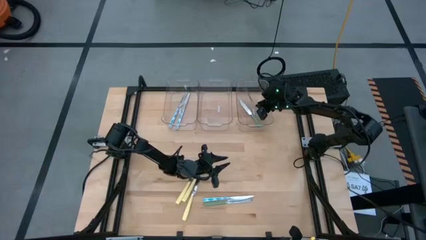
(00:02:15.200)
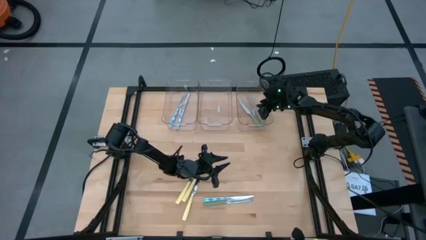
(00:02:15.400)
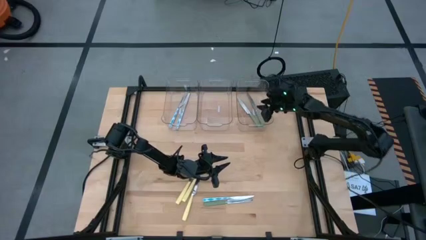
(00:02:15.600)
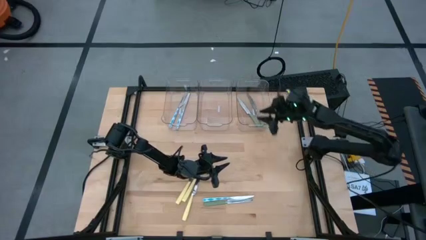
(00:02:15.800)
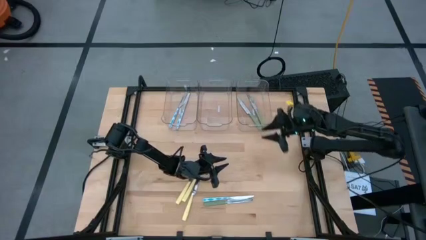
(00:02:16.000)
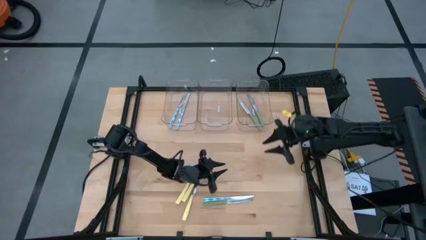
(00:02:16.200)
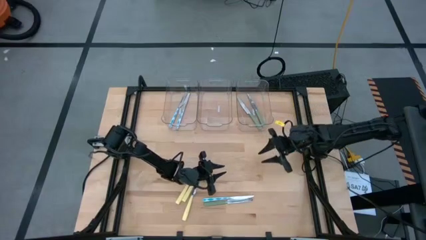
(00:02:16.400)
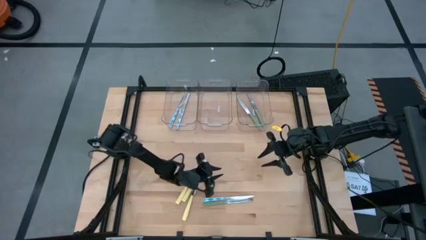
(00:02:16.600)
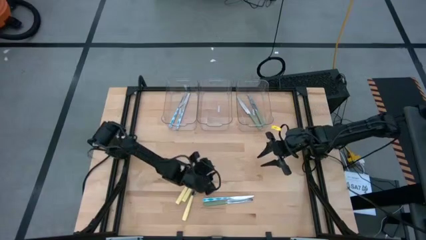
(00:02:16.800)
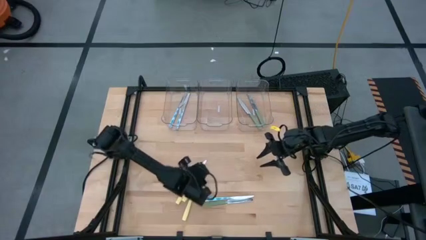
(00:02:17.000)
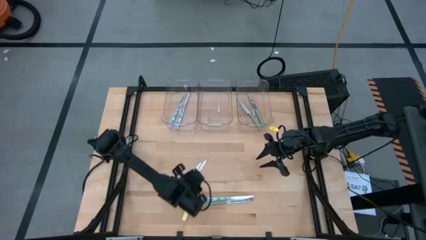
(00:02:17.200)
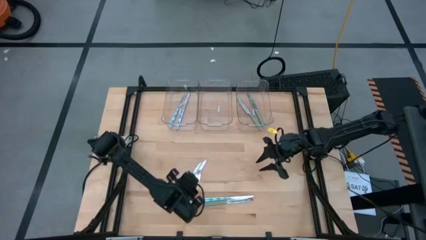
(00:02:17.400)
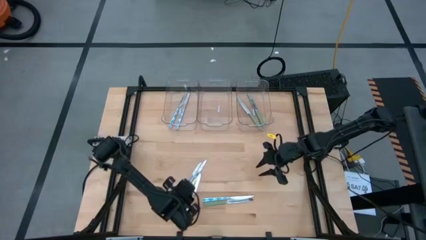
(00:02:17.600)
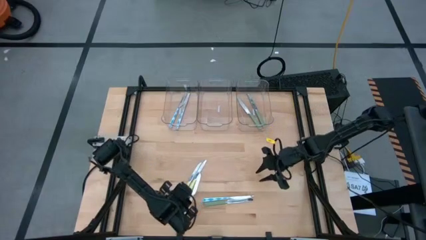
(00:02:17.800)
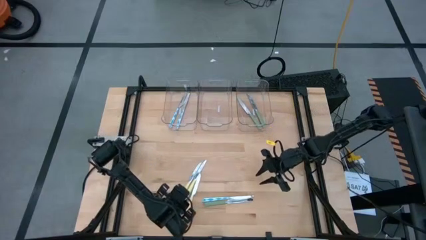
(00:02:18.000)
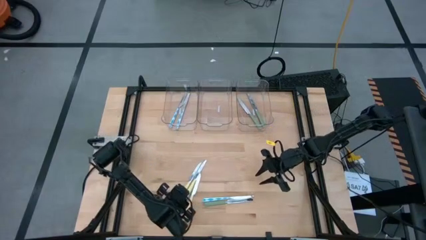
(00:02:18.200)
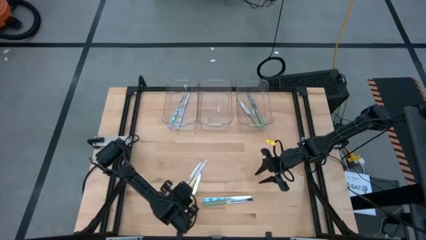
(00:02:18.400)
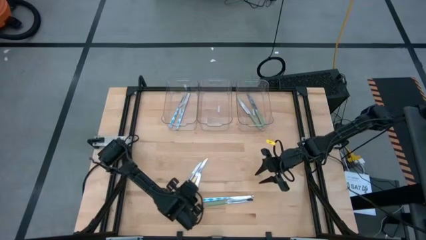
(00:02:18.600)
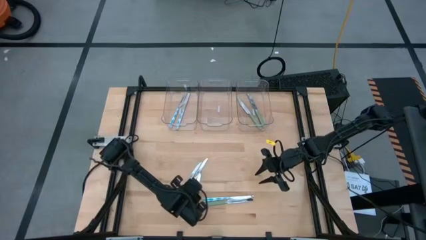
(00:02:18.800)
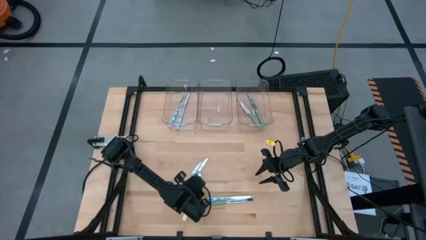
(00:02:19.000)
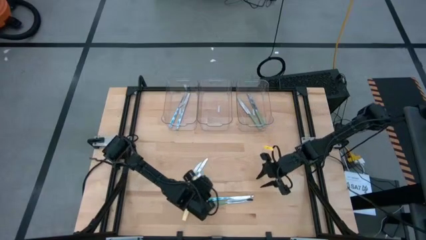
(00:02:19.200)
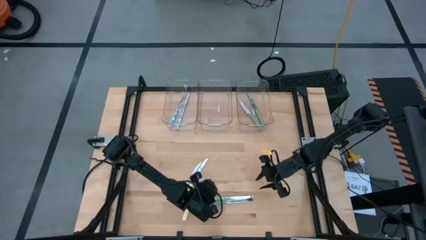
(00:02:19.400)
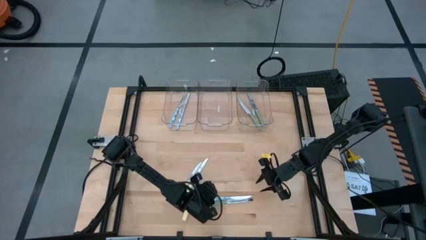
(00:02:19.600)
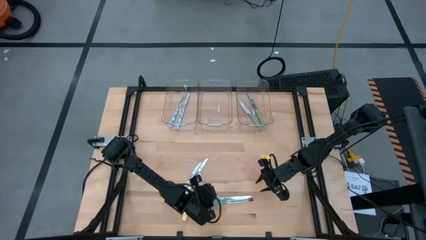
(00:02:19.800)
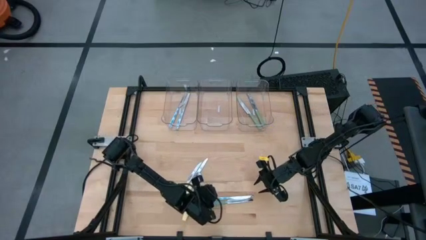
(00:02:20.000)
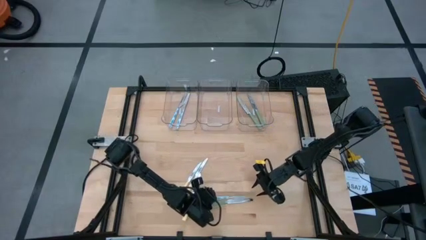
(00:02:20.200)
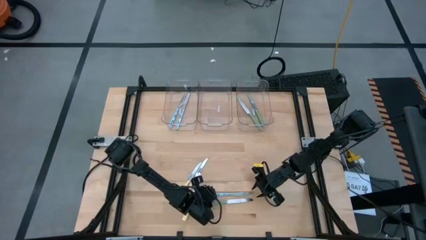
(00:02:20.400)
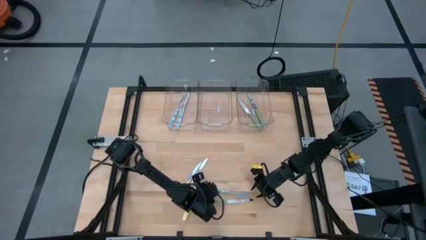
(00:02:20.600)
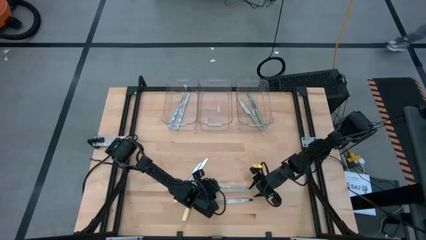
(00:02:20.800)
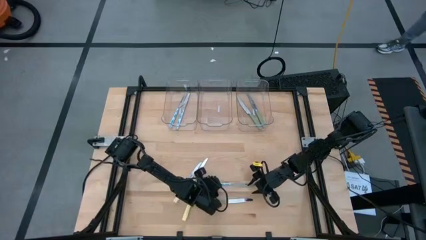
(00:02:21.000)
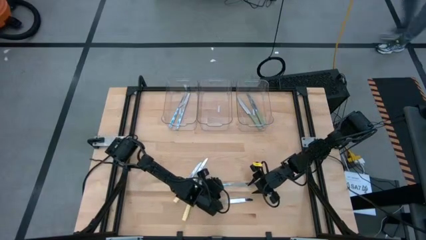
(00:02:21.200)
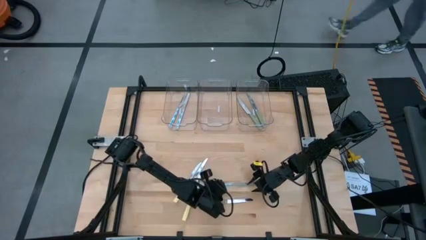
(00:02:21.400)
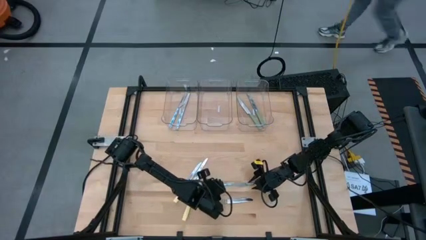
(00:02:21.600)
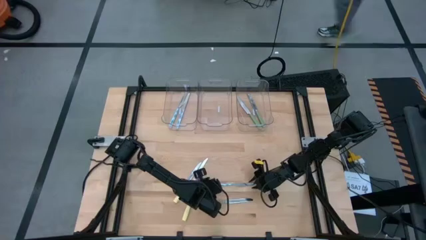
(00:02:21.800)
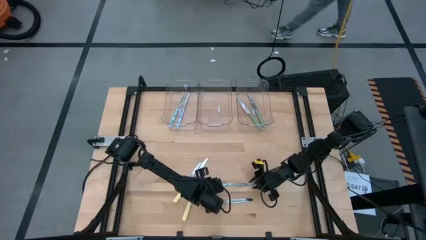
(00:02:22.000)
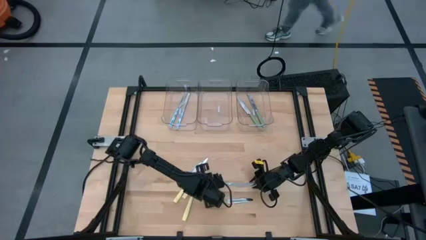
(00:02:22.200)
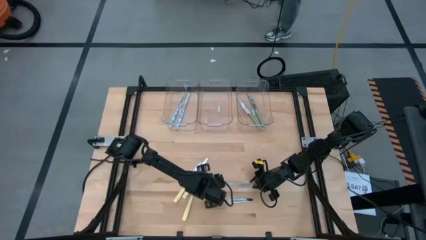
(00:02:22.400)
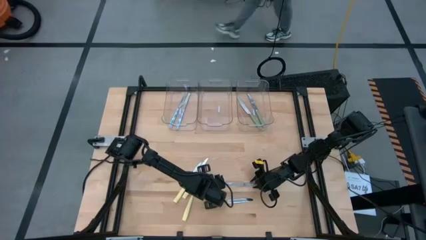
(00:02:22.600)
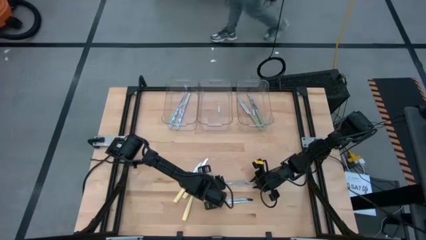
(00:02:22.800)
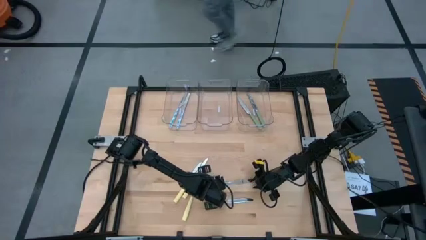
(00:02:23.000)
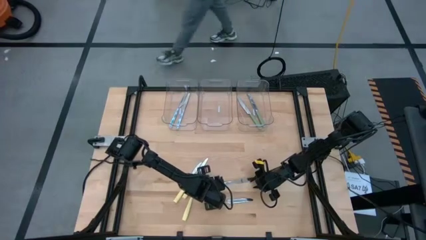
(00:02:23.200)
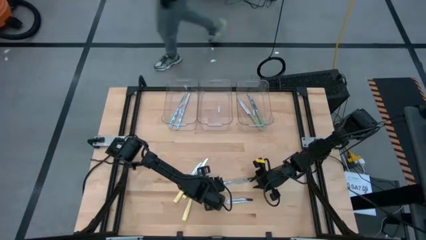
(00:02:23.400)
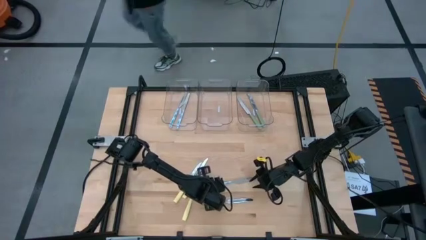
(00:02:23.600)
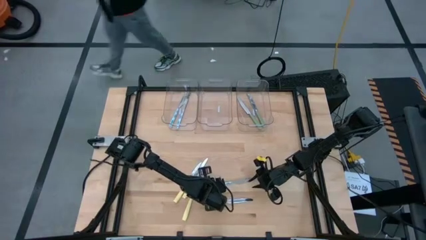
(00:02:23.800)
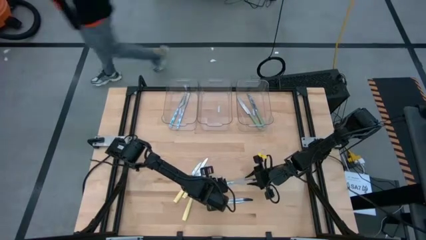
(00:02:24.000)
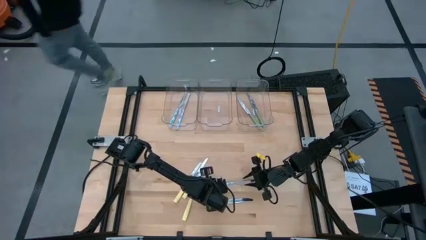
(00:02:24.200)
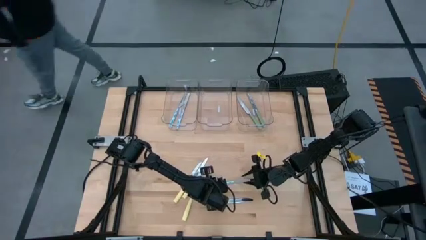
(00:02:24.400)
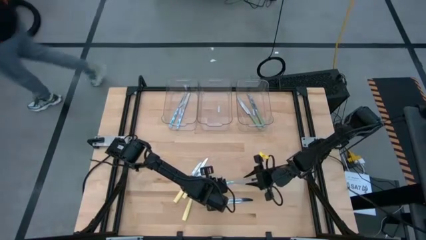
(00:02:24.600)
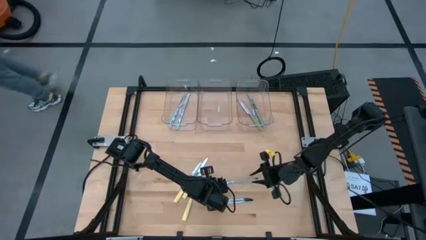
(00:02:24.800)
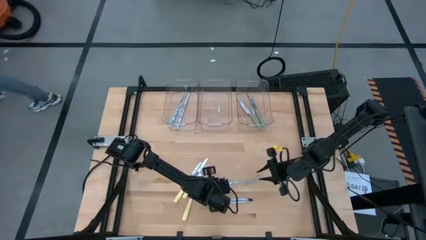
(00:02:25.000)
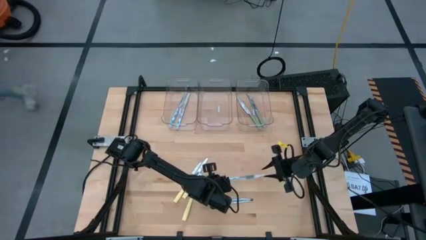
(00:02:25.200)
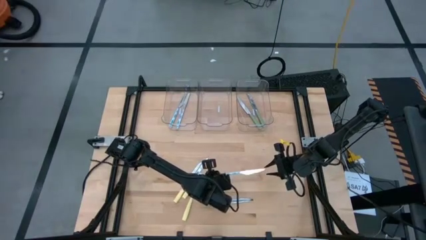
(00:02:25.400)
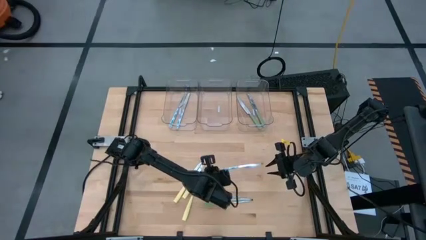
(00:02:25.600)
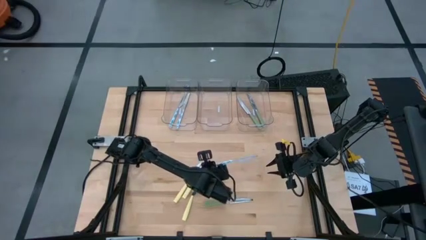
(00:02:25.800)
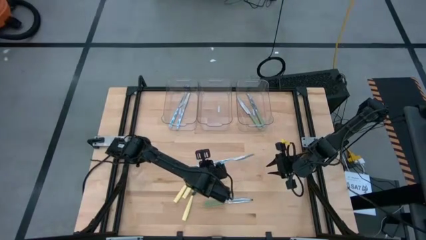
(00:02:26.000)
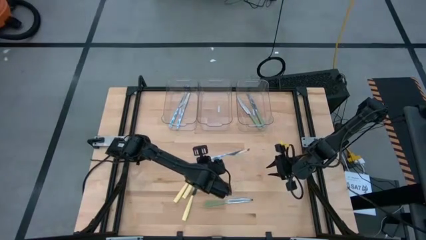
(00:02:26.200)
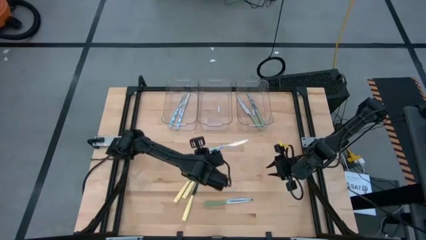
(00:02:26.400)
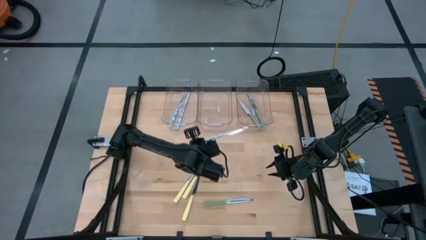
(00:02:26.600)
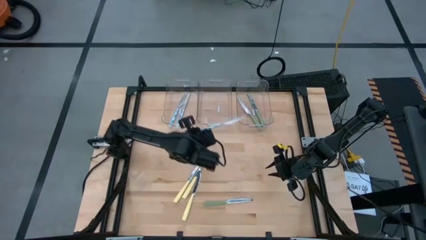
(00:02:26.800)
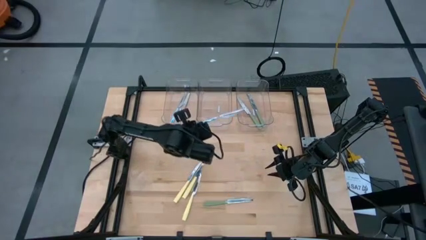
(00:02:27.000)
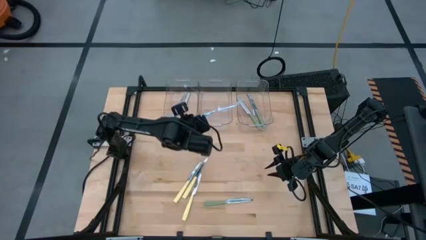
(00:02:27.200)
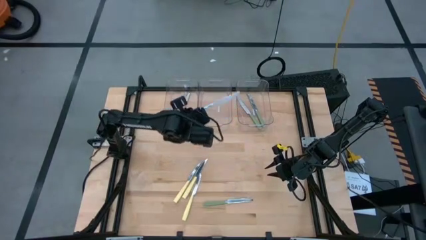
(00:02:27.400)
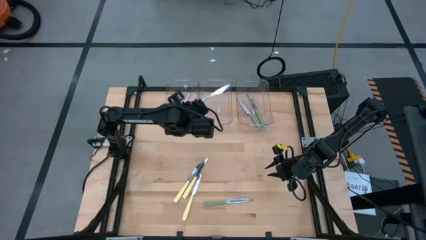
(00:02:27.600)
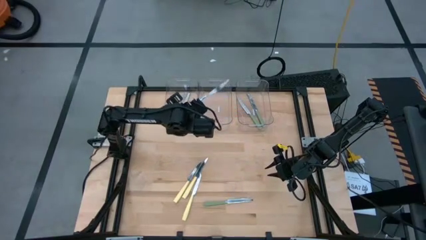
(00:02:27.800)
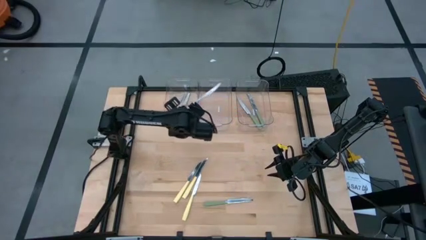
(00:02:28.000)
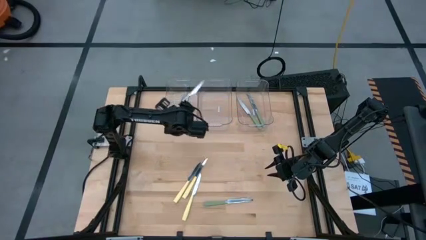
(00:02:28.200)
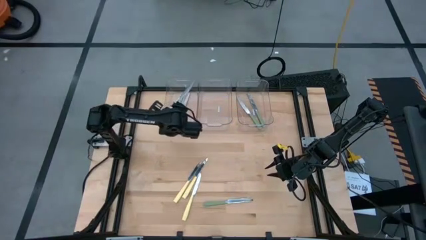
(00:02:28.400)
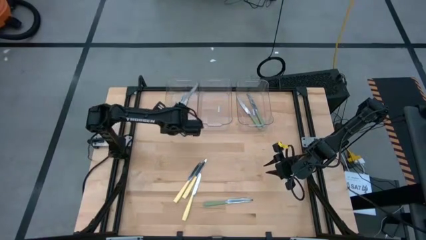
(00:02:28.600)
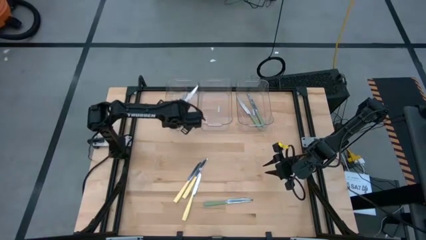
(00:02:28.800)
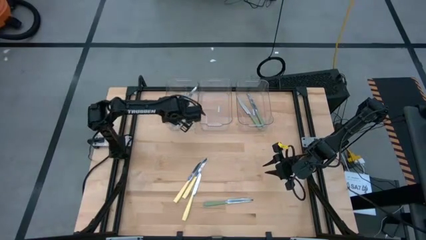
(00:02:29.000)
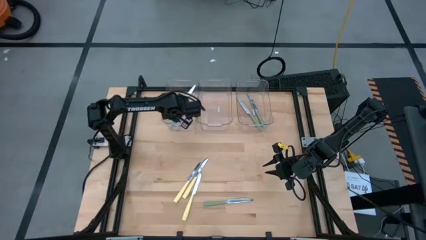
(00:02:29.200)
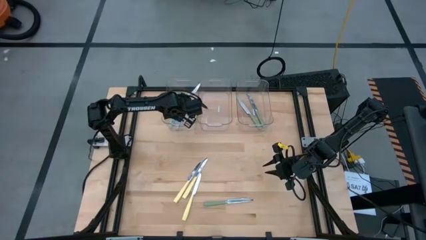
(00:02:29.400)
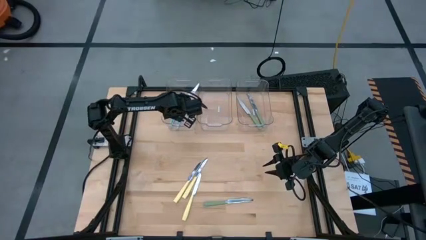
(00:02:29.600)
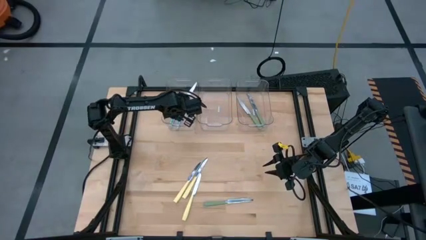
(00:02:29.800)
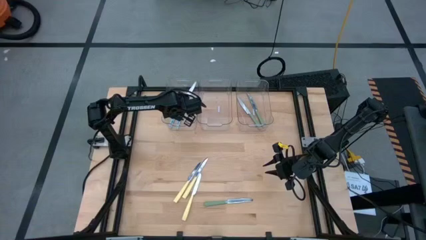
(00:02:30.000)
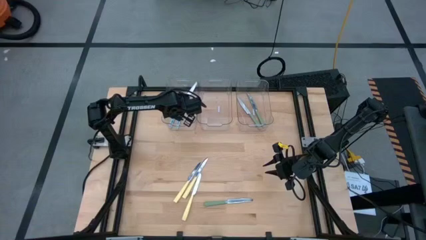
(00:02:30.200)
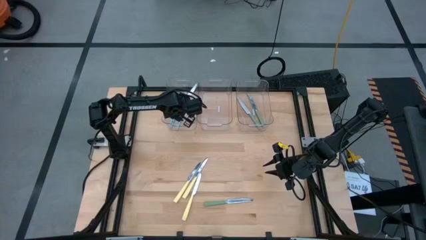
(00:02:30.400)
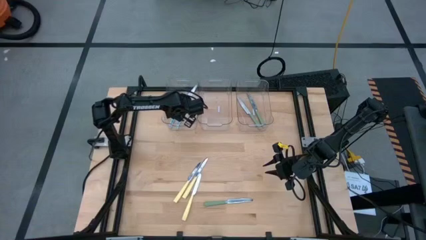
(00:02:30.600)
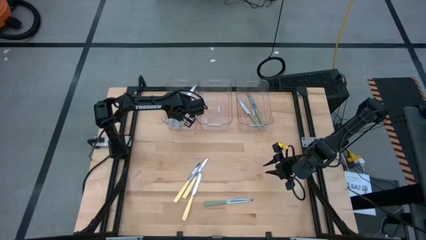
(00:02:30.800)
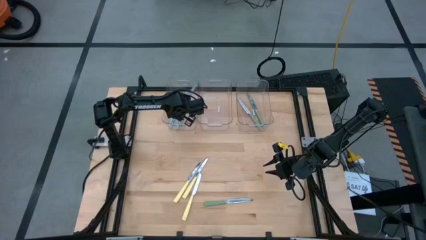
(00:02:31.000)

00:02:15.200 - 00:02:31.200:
Task: Sort silverware by color (type)
Put the blue patterned knife into the left transparent bin

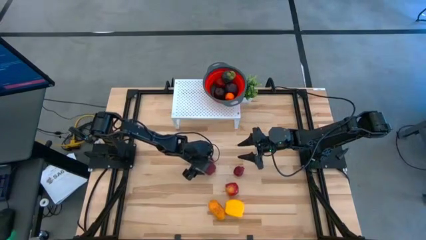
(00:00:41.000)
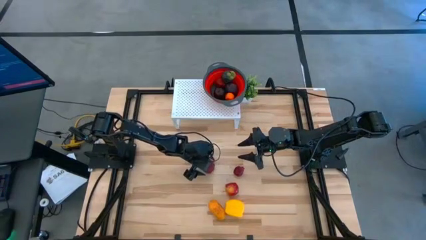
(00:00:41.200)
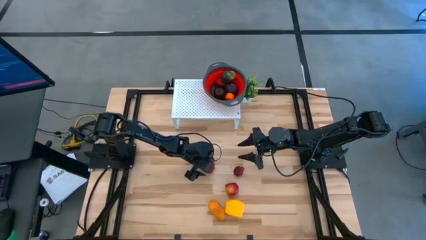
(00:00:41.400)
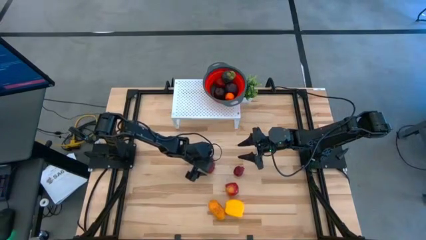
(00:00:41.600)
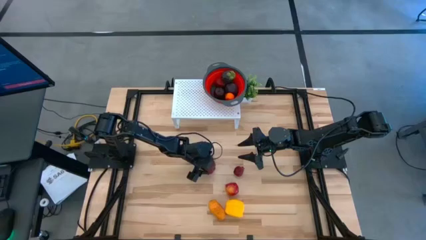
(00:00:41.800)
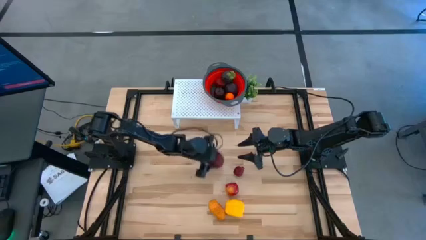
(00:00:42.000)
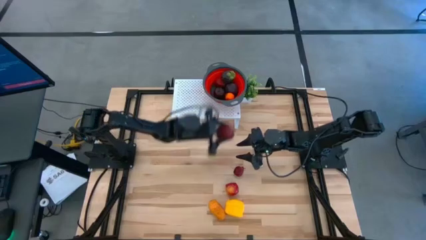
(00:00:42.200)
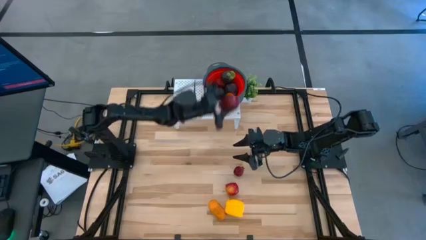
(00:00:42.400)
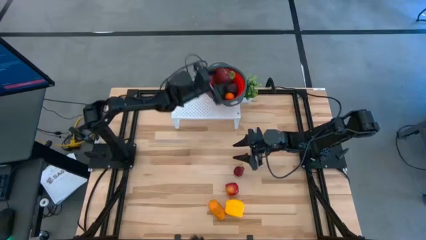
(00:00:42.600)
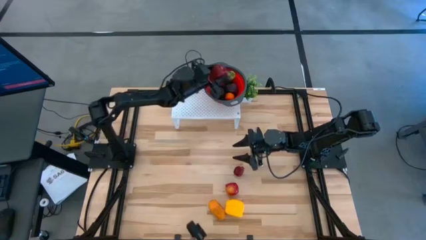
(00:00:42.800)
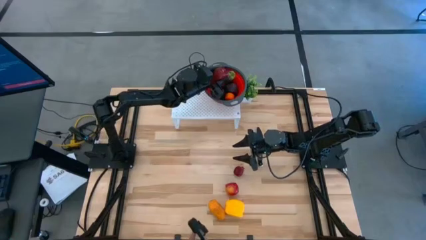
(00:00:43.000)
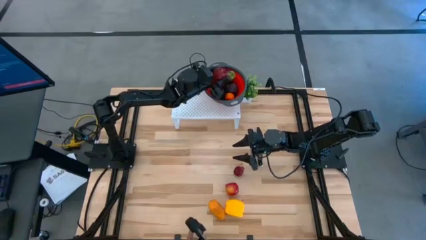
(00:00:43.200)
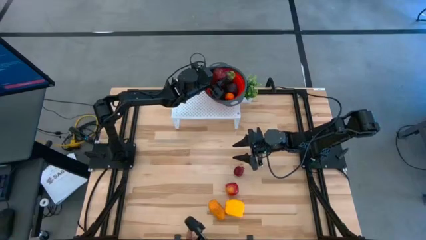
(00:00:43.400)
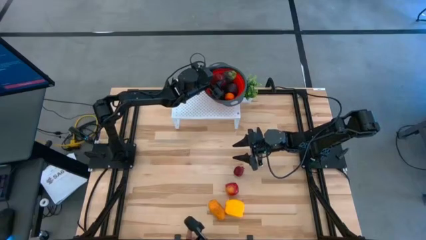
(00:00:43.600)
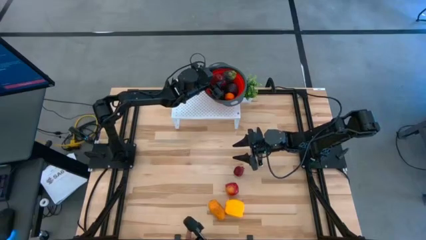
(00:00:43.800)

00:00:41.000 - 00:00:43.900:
Task: Pick & Place Fruit
Put the top red apple into the red strainer bowl
